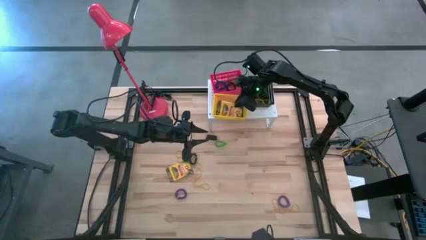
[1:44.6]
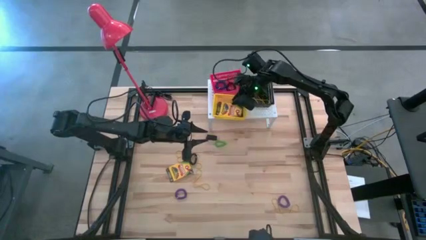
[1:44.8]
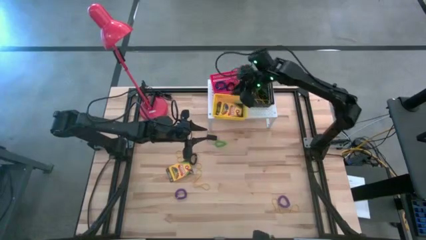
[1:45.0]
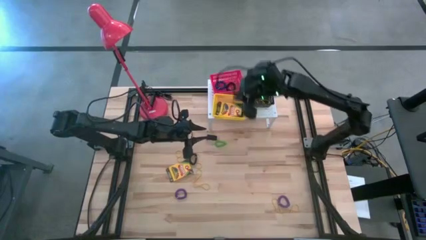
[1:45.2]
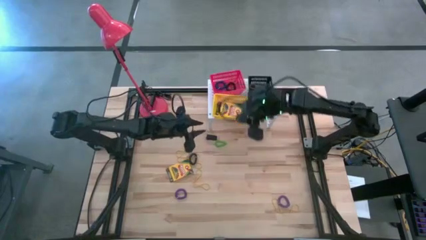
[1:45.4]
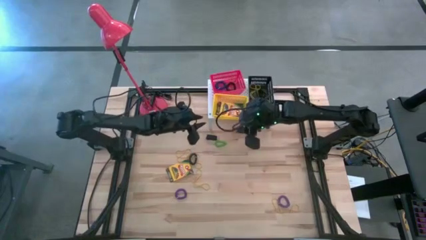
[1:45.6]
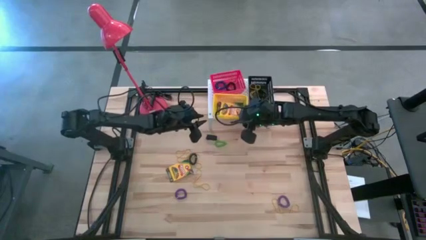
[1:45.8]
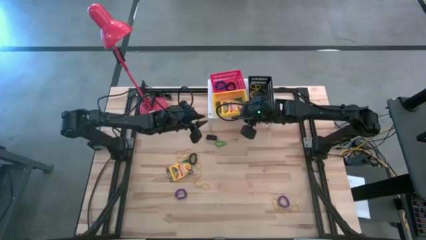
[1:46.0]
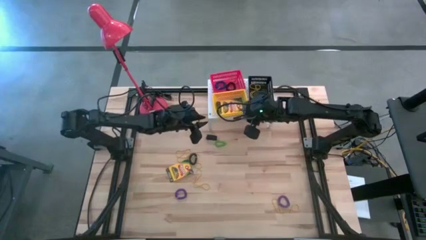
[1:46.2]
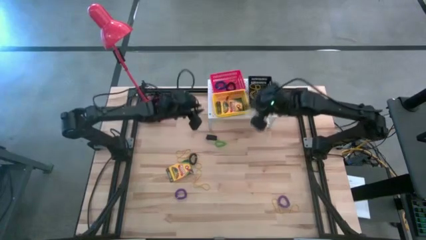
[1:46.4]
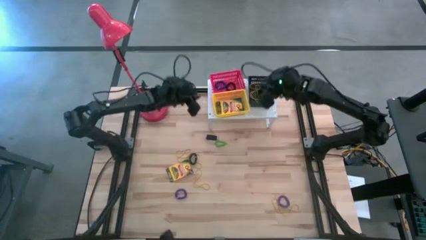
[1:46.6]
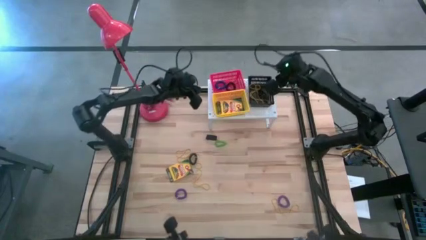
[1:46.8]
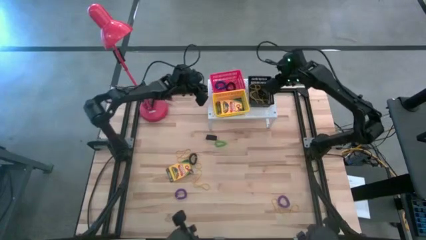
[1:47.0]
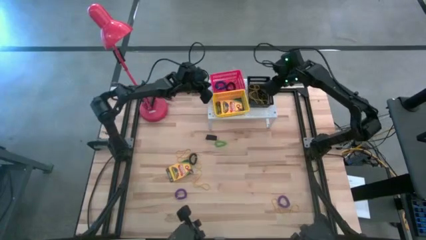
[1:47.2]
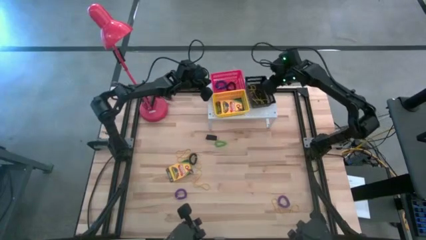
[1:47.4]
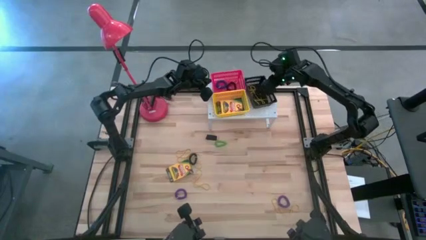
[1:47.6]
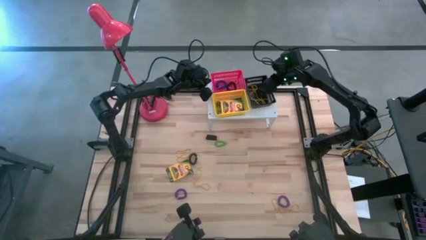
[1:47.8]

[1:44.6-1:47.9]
Task: Pick & Place Office Desk Supplies
Adjust the bins on the shelf

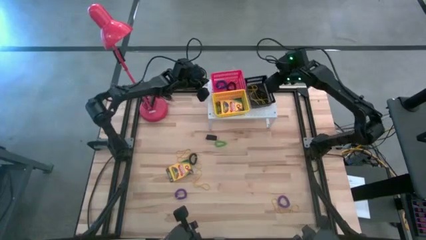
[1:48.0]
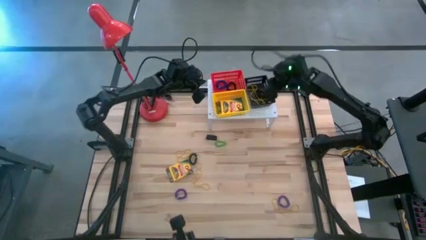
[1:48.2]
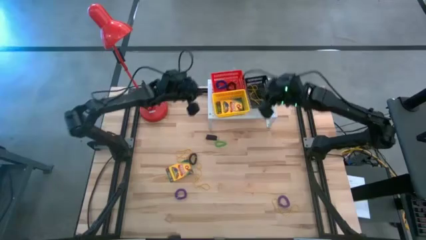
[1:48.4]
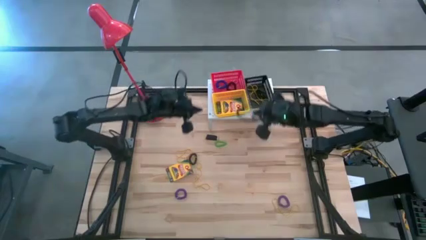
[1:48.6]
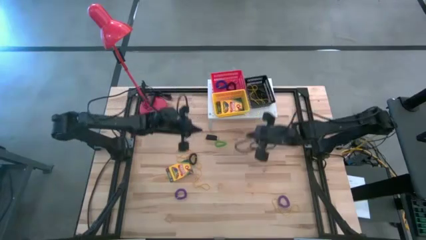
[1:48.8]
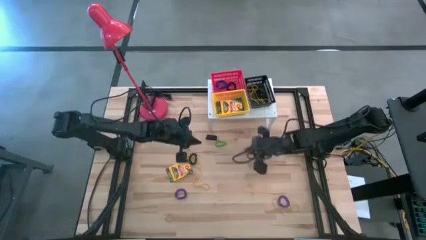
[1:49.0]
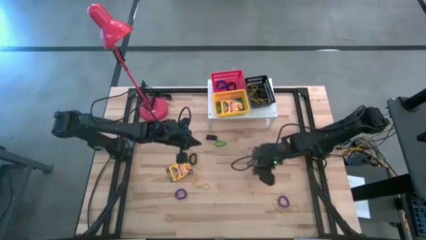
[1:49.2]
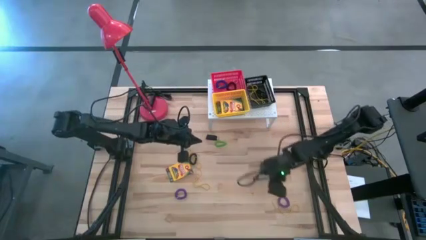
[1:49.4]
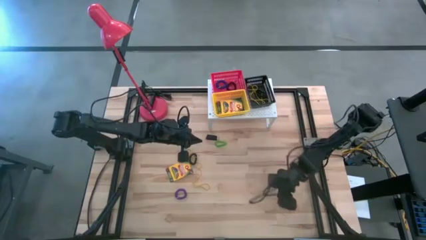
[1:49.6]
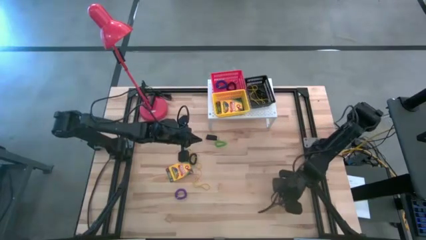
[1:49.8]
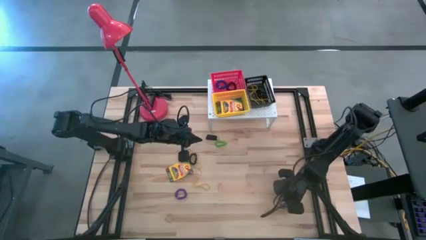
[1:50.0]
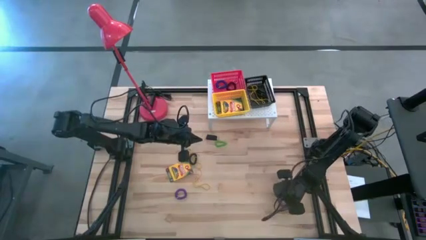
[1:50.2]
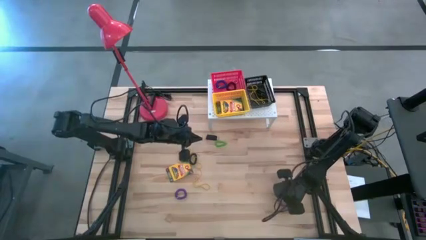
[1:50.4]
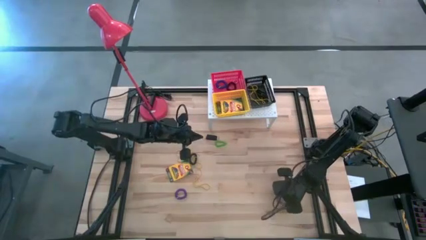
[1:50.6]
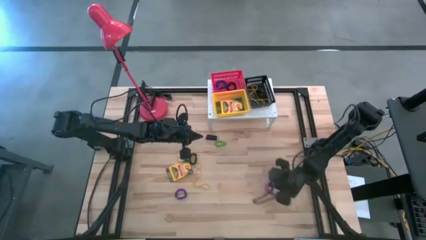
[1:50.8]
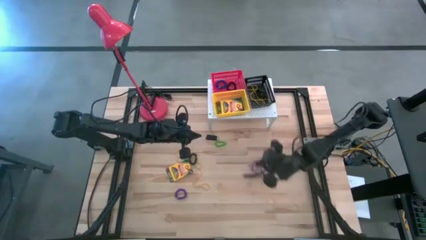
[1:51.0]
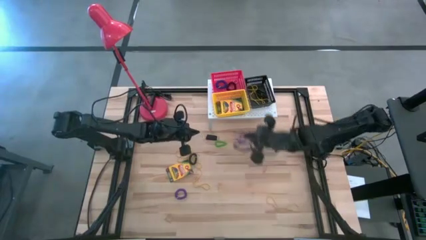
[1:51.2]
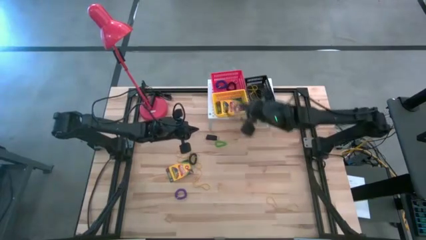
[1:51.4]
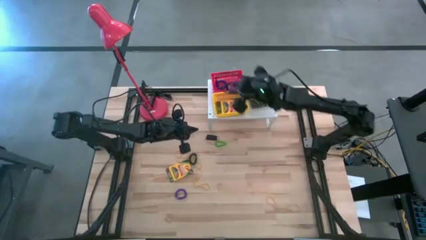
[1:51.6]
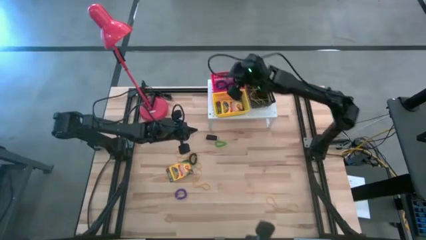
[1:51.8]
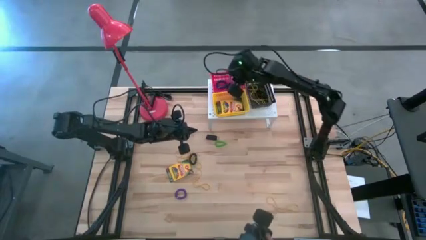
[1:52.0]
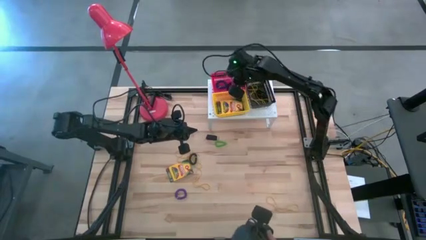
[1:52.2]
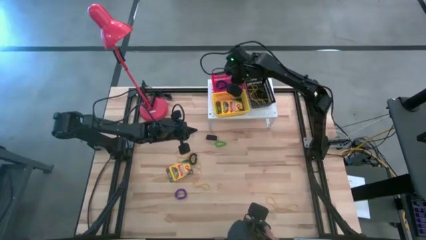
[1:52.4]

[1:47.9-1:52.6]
Put the violet spring keychain into the red bin on the shelf

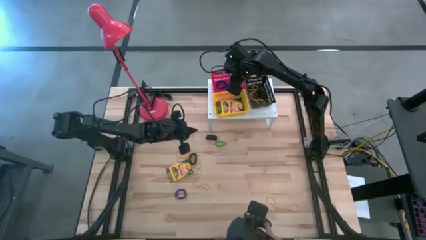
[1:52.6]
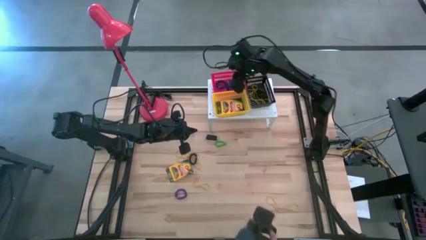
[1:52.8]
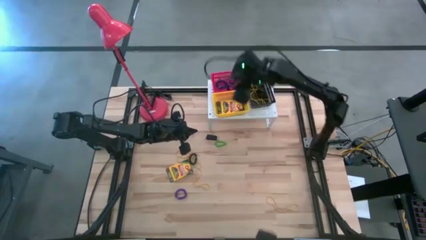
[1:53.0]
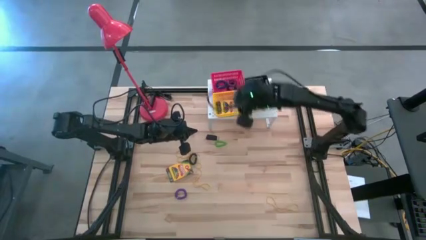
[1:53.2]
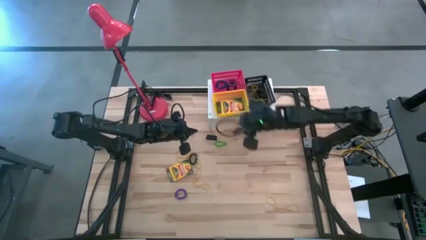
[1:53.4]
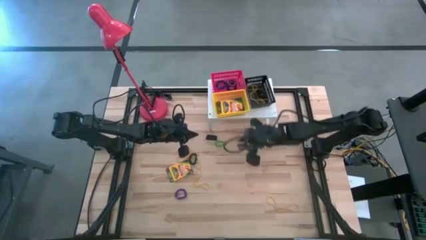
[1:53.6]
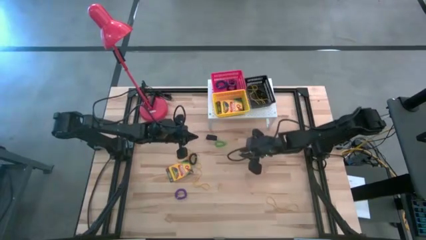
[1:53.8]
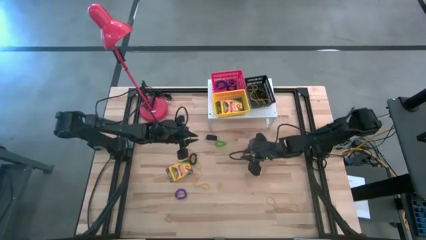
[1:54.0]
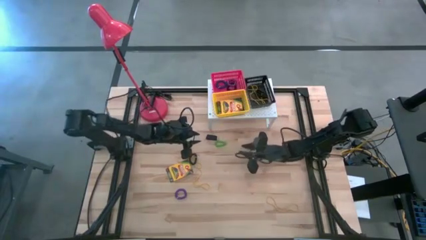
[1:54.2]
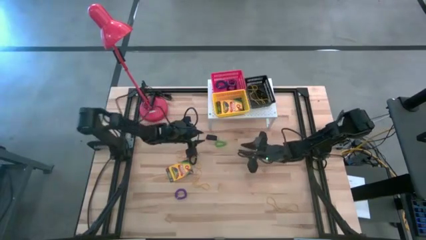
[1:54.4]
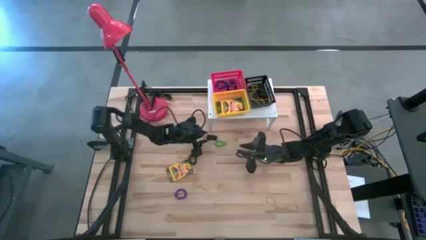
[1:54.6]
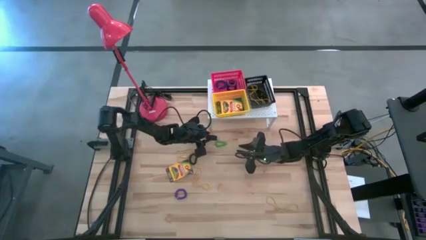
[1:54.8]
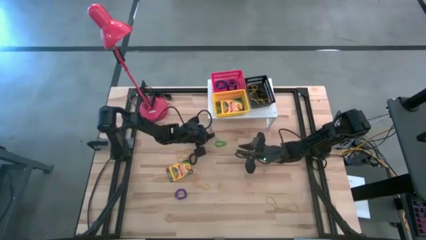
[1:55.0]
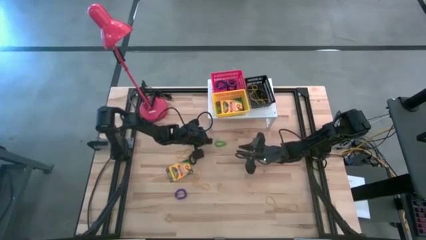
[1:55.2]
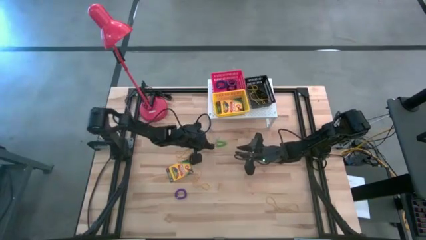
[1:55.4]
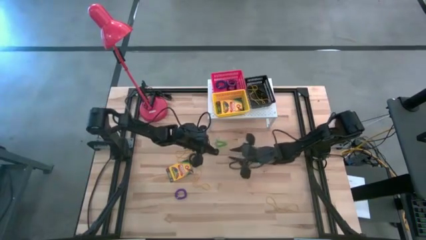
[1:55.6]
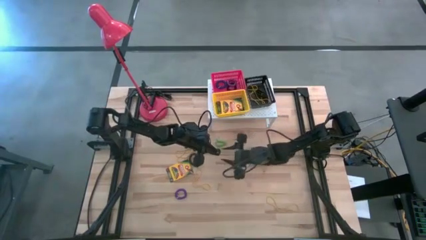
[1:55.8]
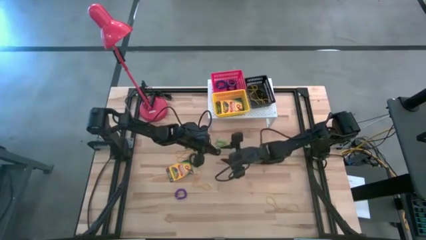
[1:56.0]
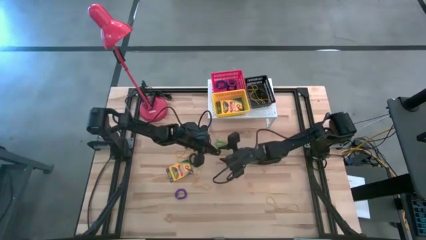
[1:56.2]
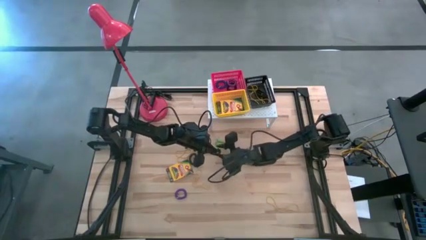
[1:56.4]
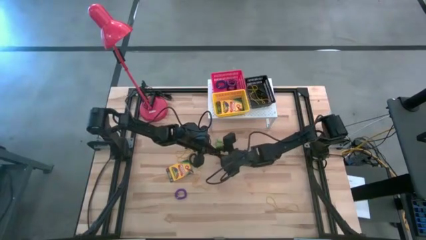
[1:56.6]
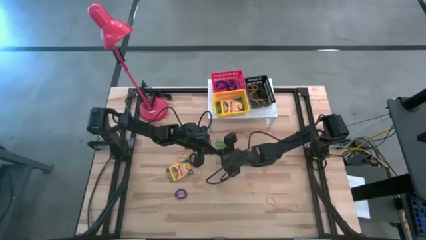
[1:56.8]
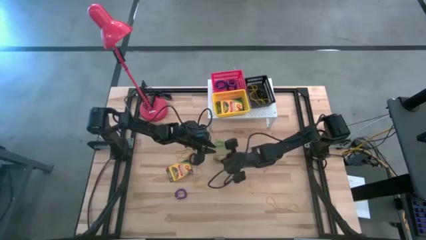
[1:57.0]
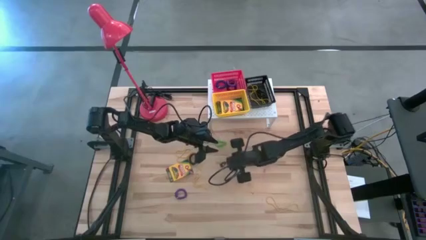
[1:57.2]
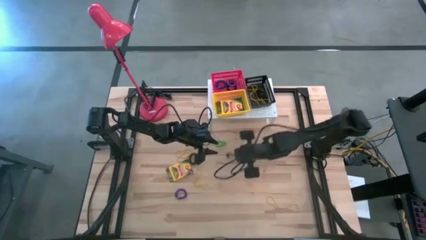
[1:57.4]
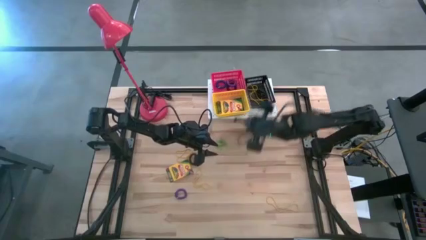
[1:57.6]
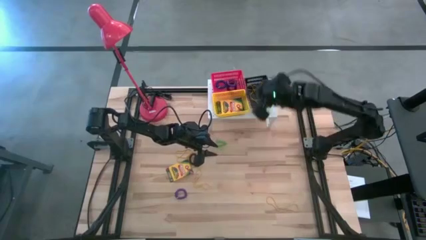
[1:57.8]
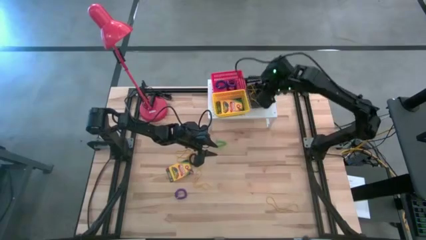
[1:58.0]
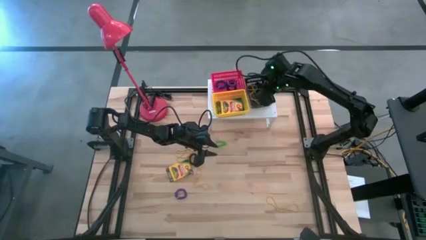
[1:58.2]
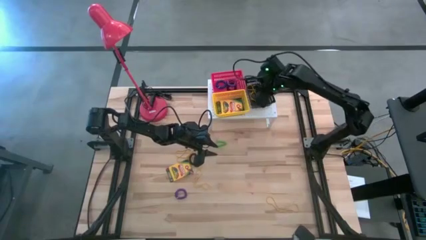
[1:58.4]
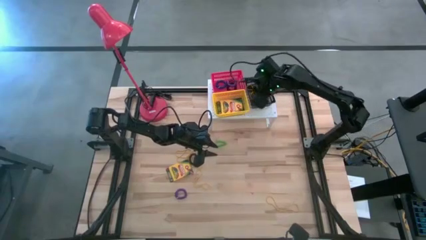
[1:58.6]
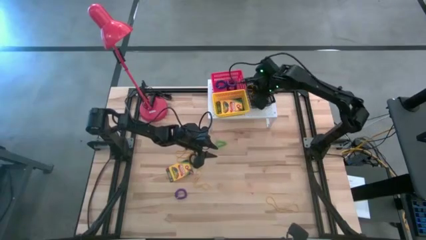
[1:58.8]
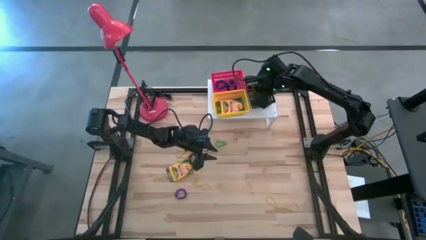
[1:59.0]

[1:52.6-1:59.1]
Put the black rubber band into the black bin on the shelf

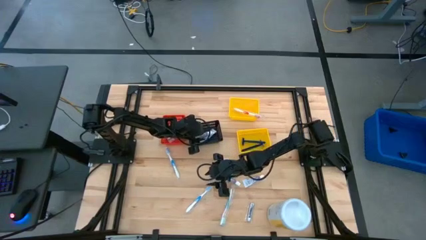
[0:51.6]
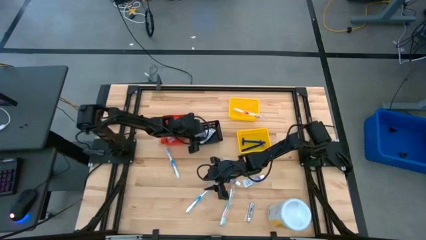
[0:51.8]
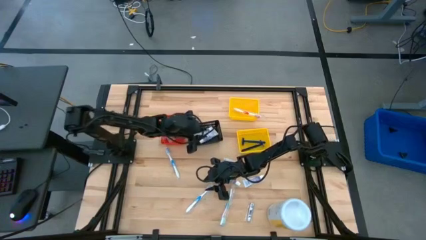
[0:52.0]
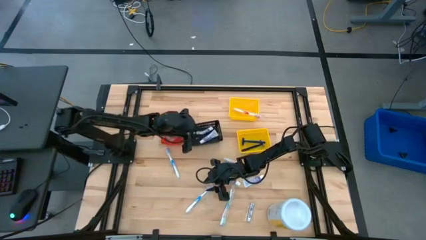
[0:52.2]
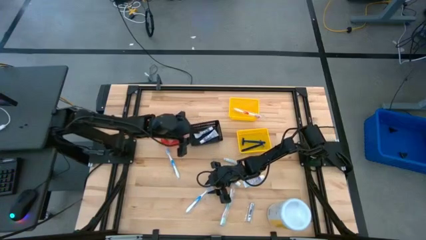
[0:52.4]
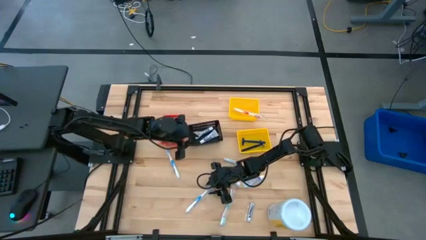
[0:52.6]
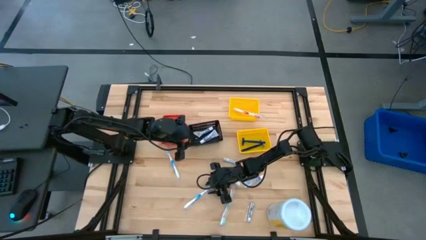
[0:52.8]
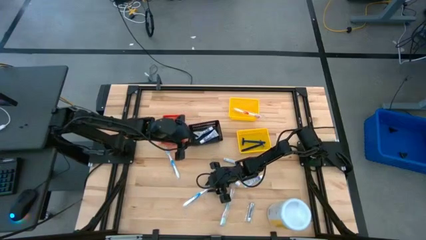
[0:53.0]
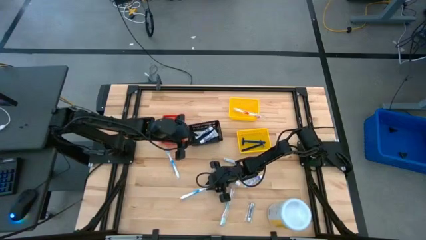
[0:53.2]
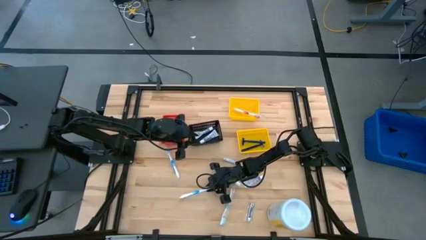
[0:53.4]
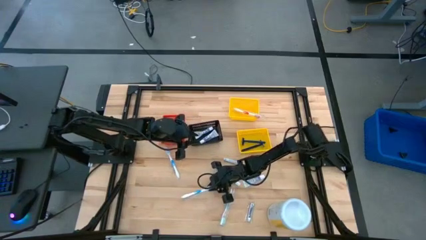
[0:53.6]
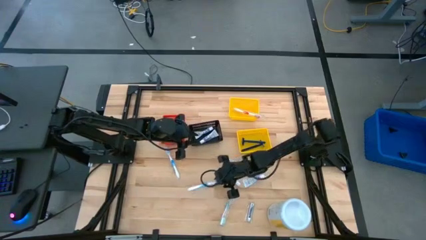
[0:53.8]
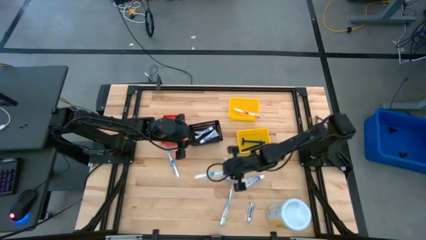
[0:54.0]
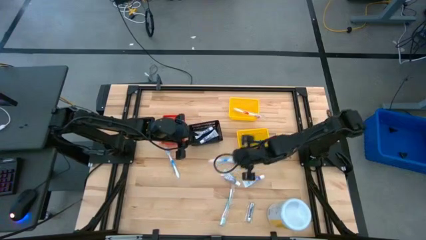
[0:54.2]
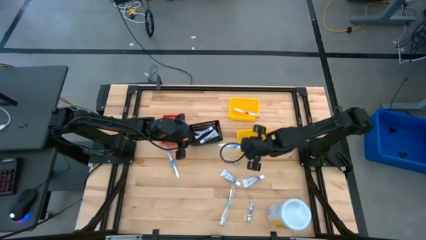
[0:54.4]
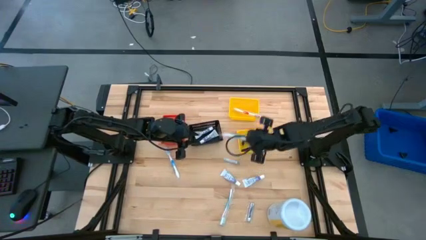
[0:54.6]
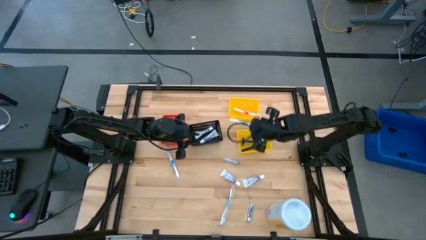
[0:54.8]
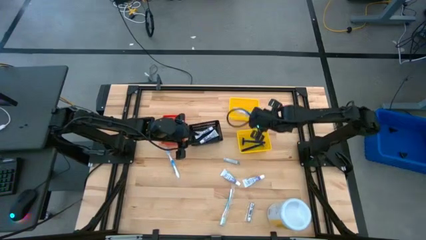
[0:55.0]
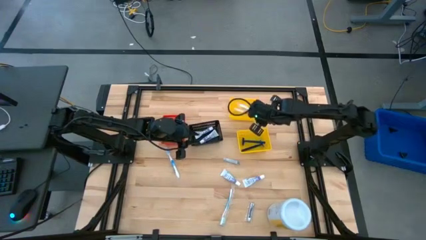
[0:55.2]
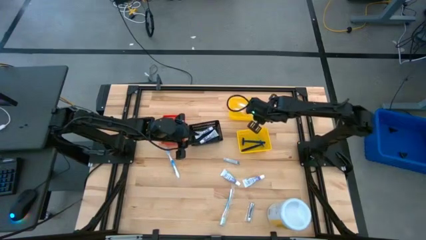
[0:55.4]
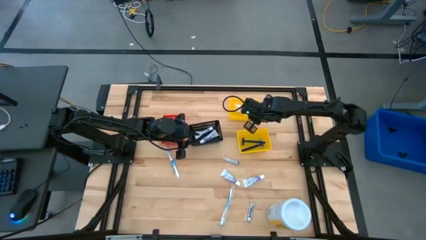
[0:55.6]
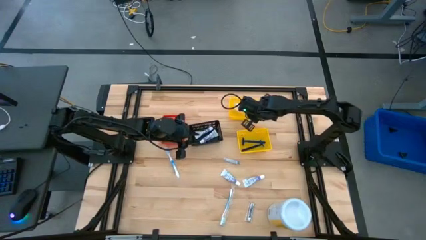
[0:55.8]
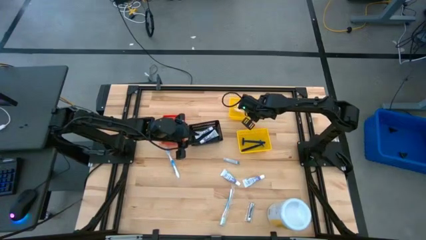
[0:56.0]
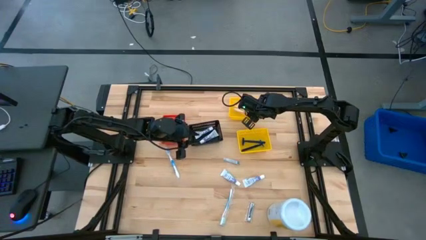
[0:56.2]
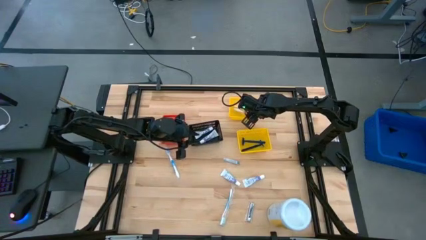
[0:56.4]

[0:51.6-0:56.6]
Task: Pick & Place Travel size toiletries
Put the blue toothbrush into the top yellow bin
